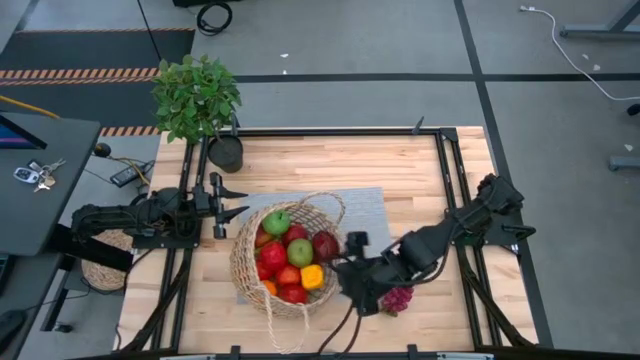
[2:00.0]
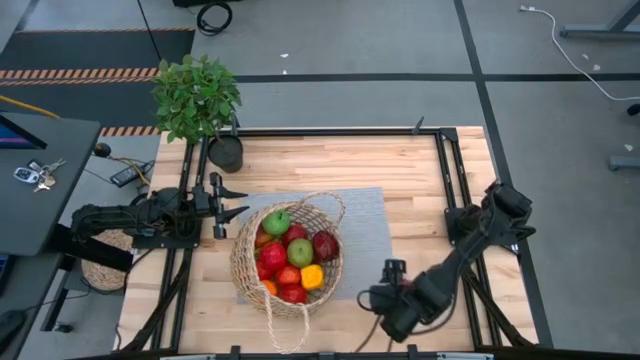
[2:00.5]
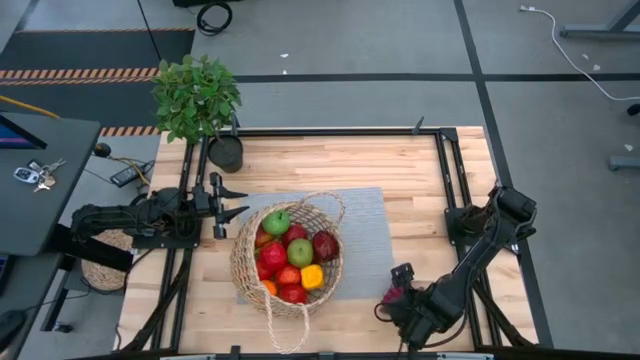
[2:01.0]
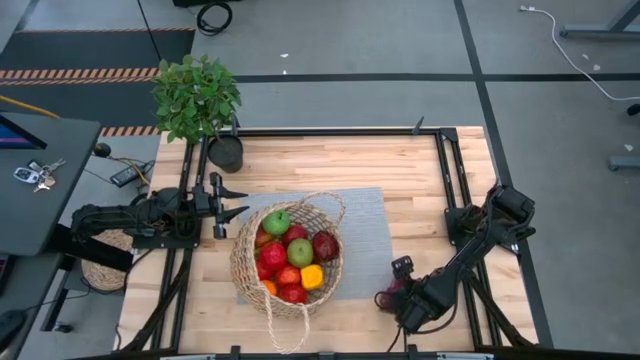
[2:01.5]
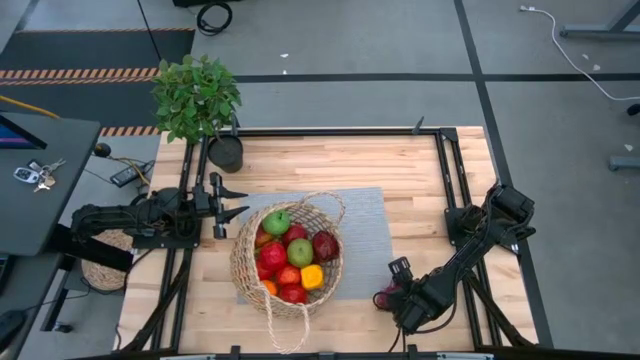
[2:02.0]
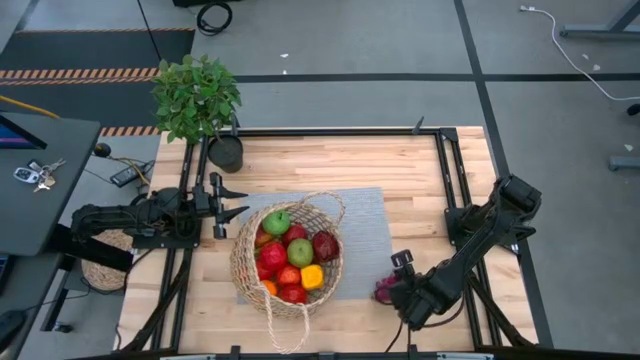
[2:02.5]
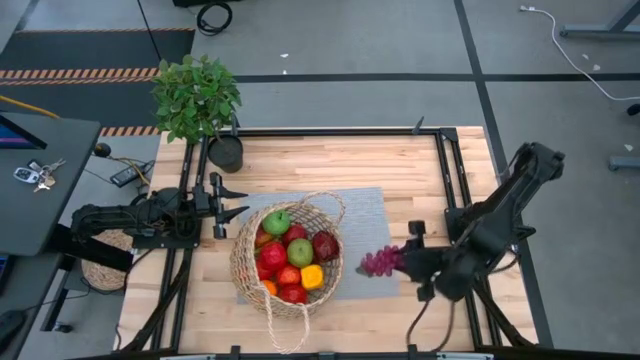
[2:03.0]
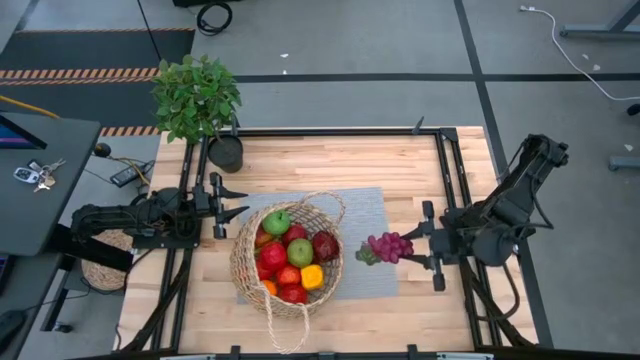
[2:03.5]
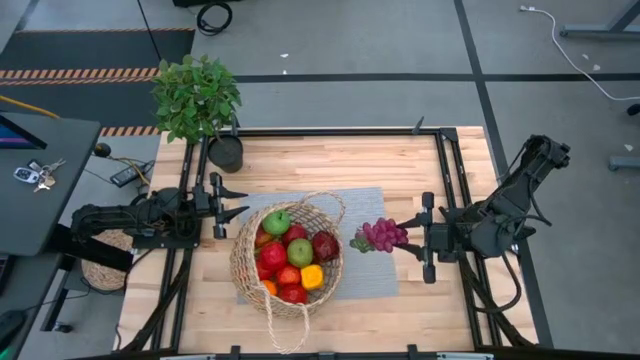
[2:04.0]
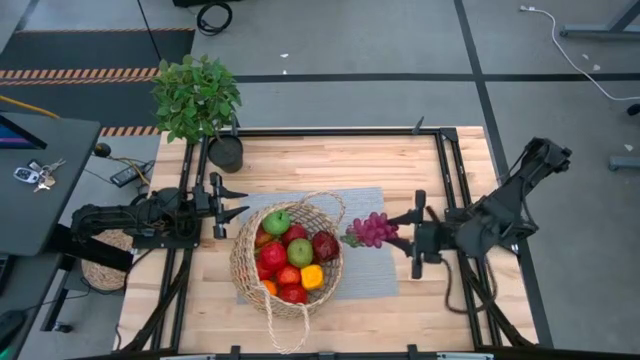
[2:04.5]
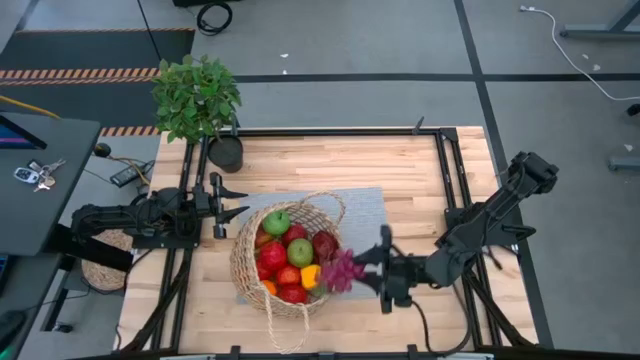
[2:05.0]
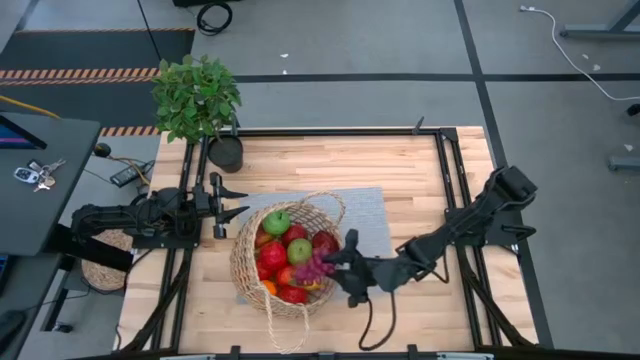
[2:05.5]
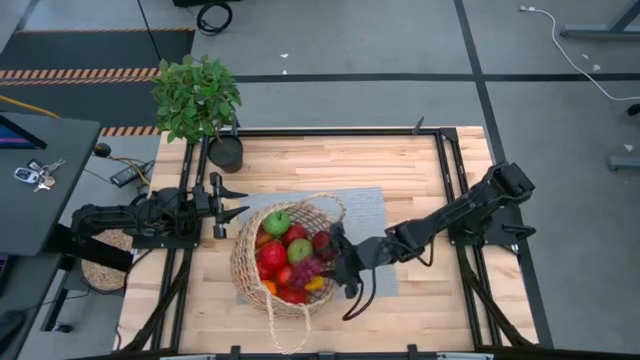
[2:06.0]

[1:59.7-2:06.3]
Task: Build produce basket
Put the grapes into the brown basket

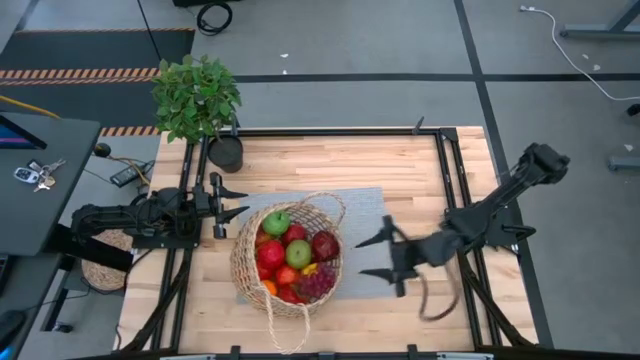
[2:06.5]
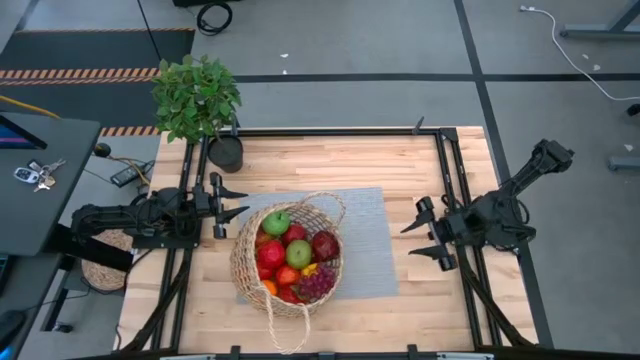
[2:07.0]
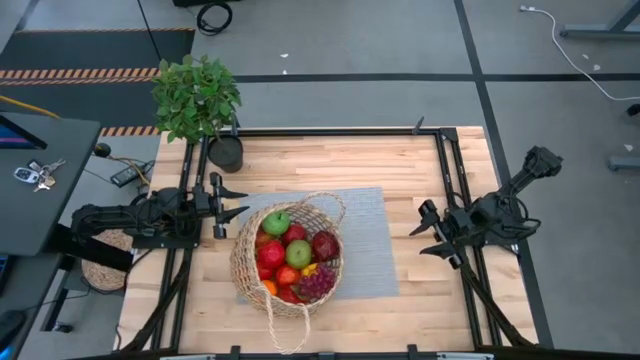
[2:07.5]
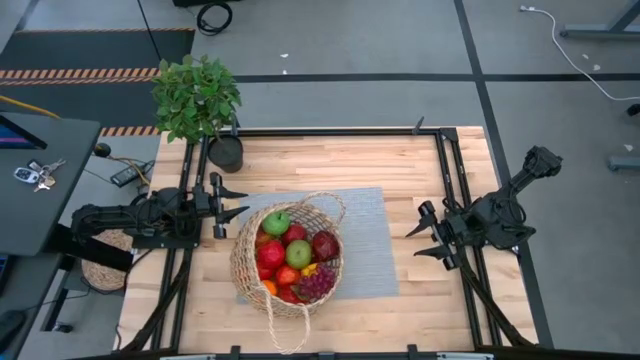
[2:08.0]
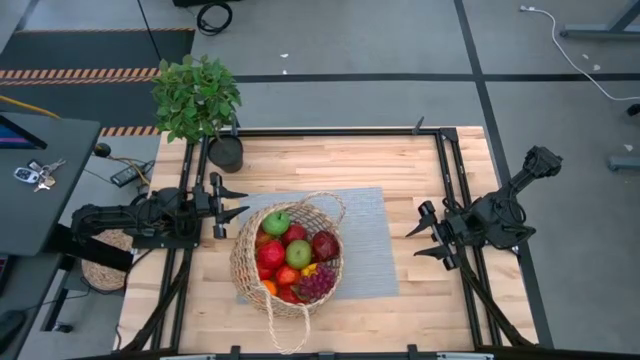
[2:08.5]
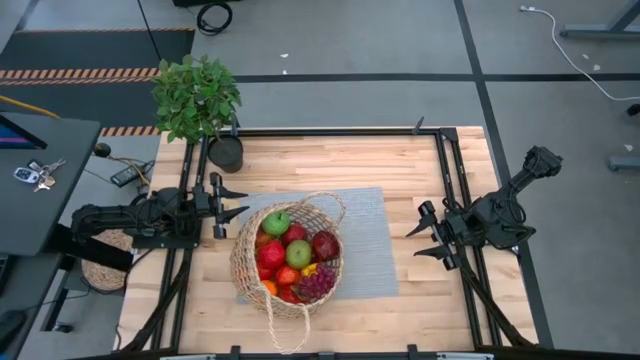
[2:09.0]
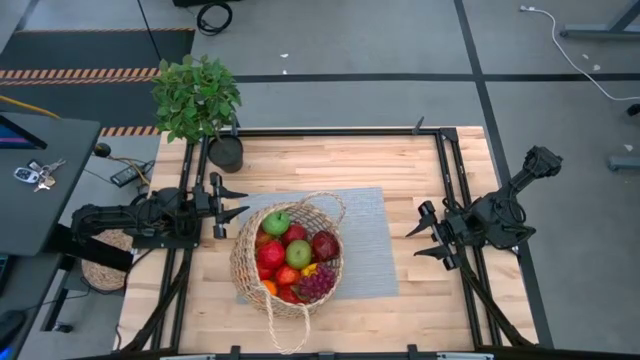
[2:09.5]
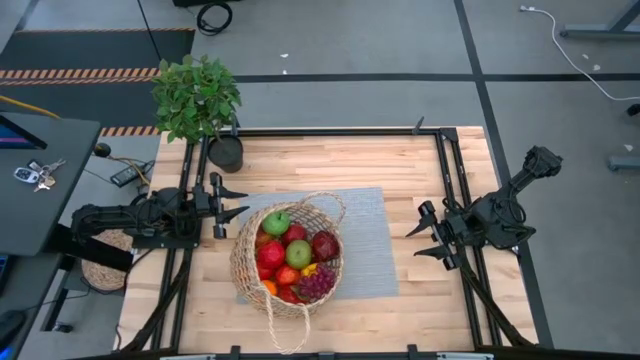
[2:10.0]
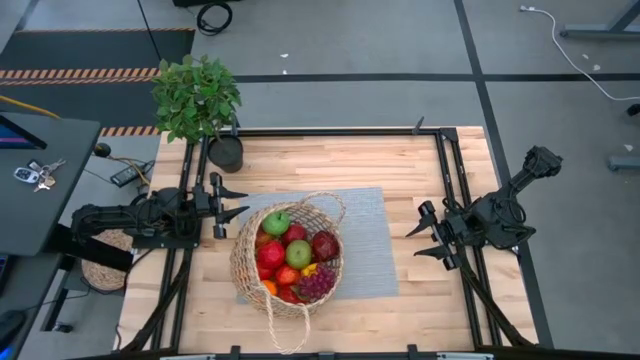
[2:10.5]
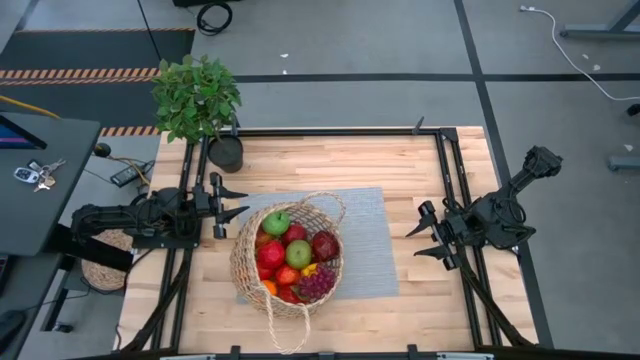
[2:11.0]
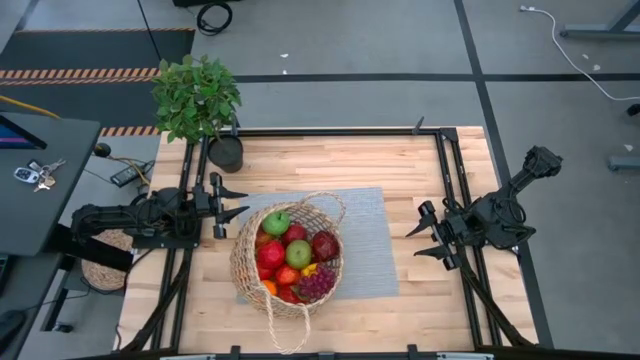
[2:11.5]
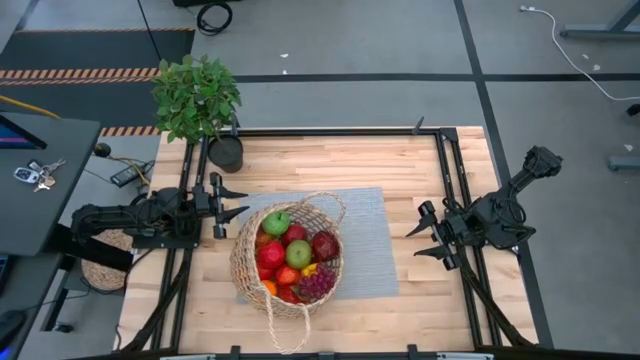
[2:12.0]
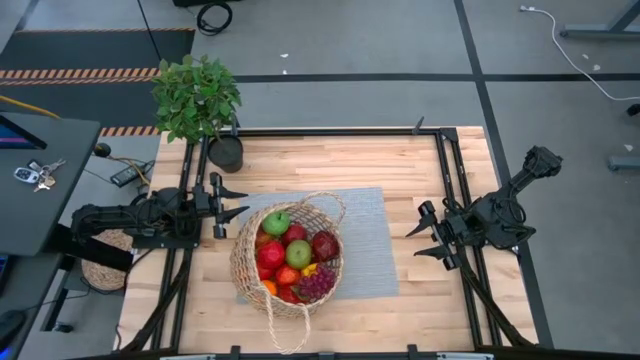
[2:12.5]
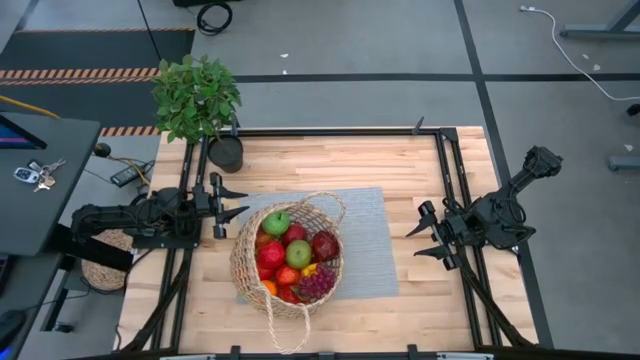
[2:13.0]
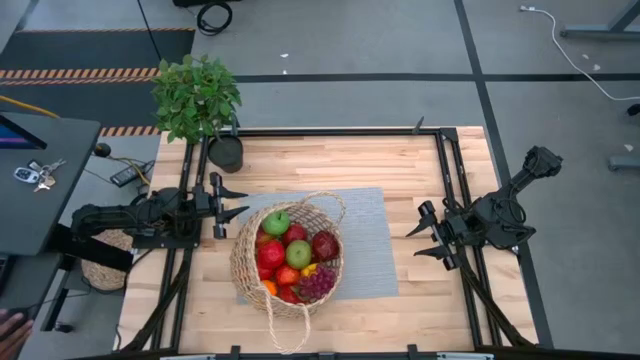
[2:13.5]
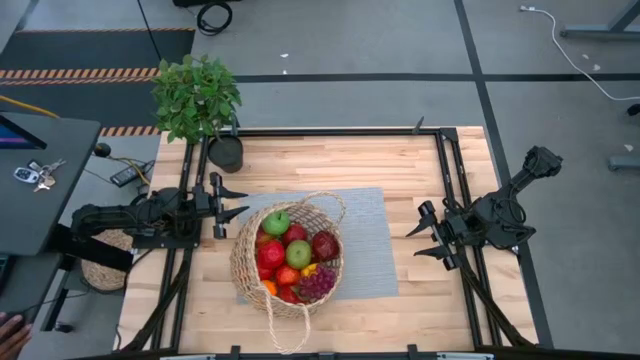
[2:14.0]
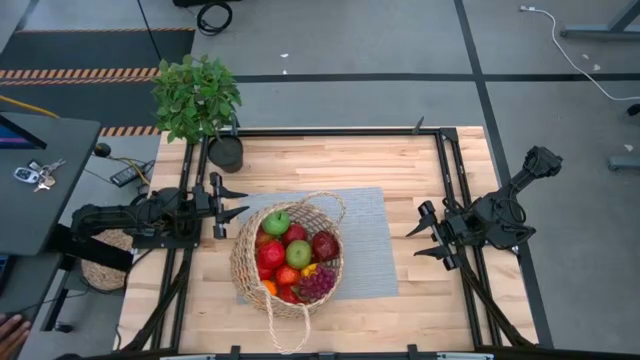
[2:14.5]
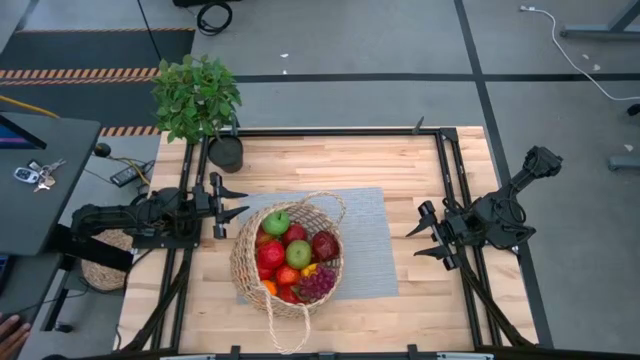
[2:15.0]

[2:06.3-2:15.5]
Return to Home Position

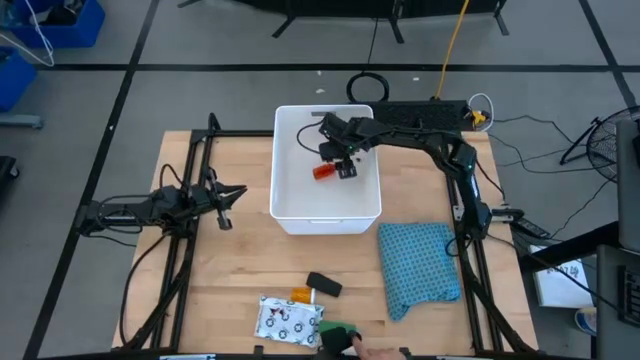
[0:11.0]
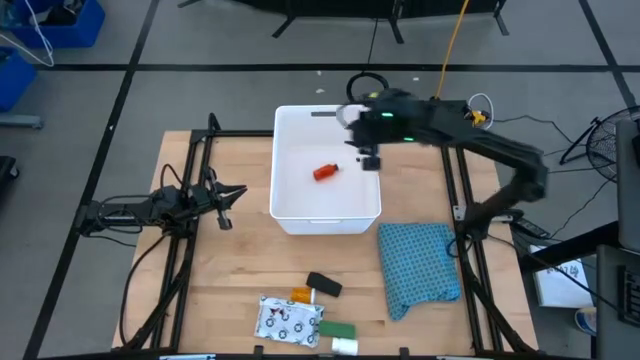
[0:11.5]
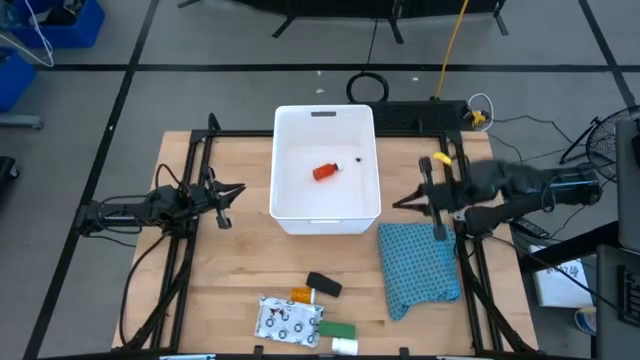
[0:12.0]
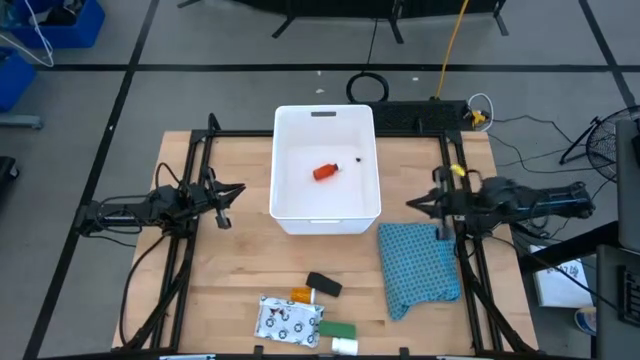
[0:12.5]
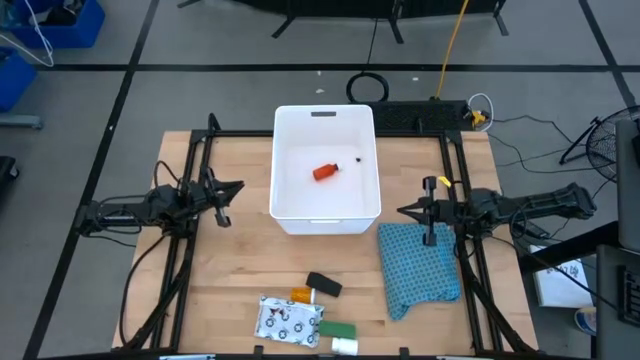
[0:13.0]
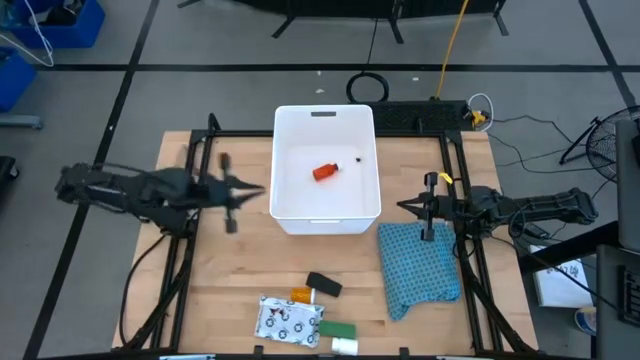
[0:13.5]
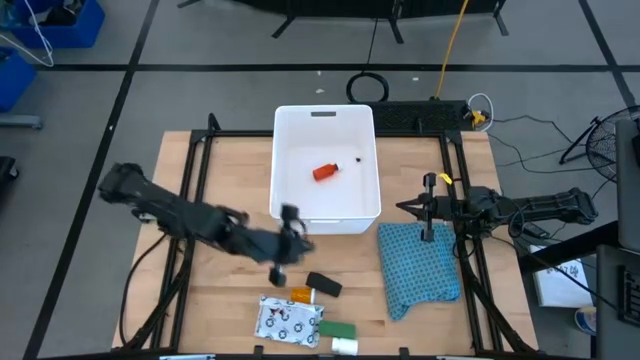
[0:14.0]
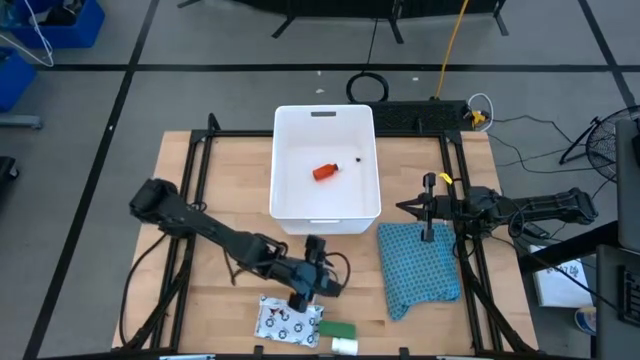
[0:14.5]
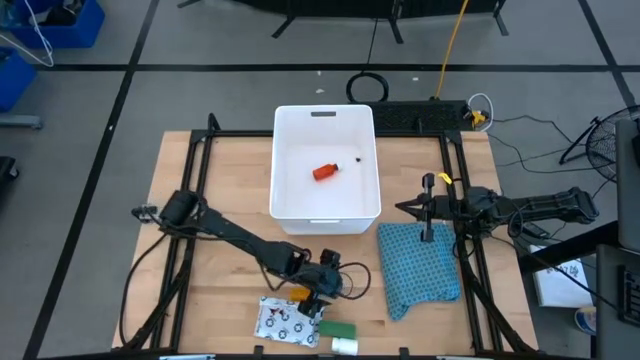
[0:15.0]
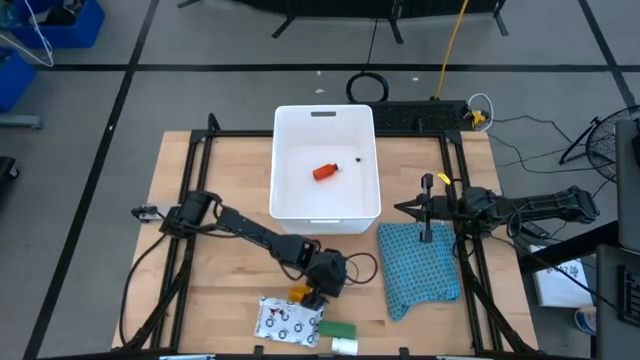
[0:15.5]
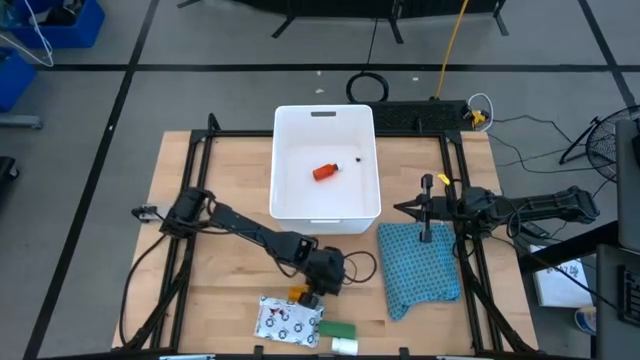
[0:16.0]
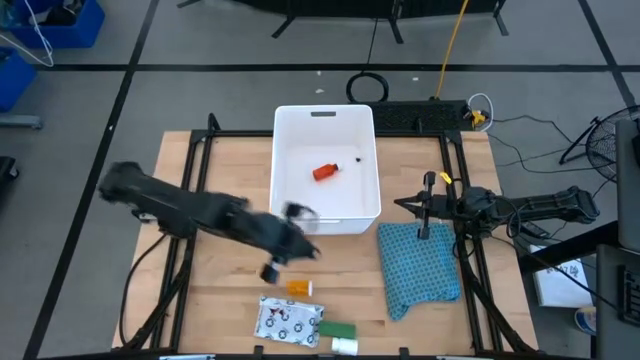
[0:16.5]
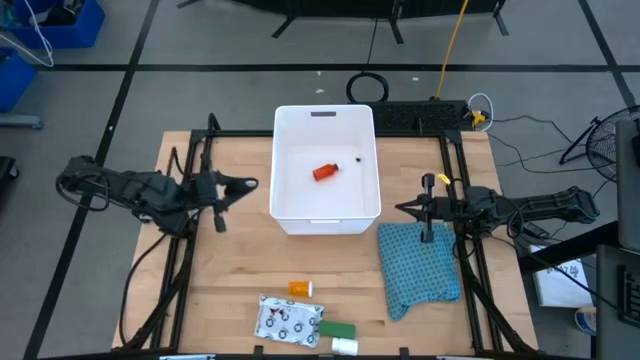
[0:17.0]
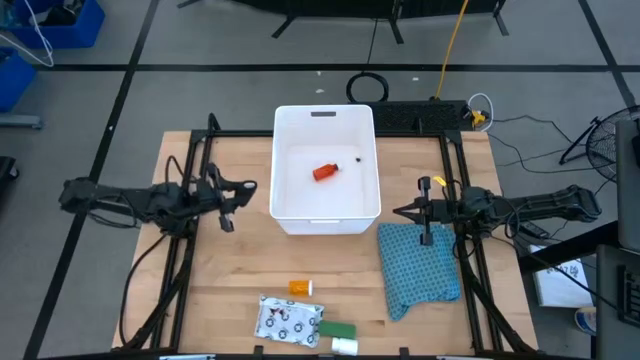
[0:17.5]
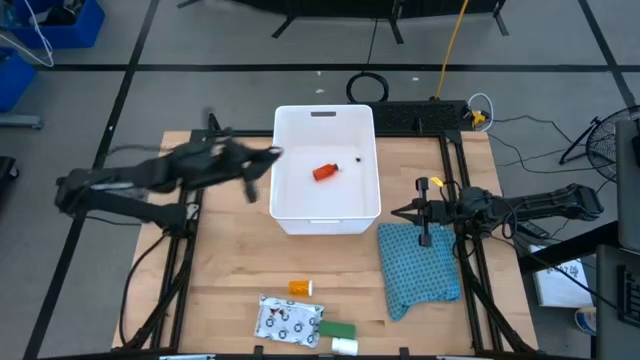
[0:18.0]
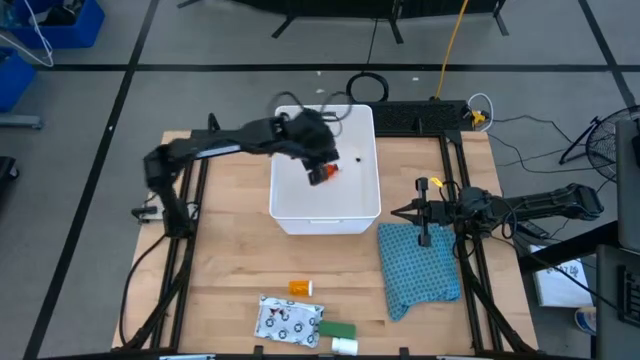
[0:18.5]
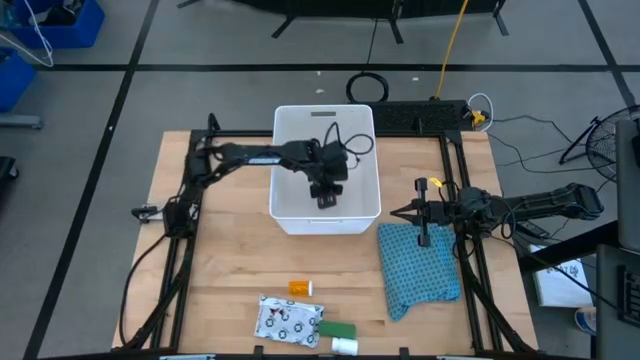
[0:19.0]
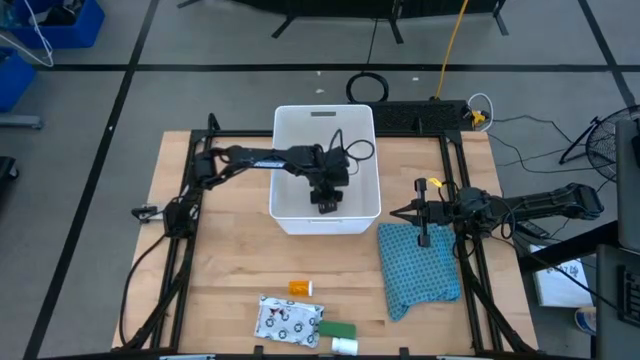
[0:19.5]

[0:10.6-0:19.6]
Task: Pick & place medical supplies in basket/bin
Put the black bandage into the bin
